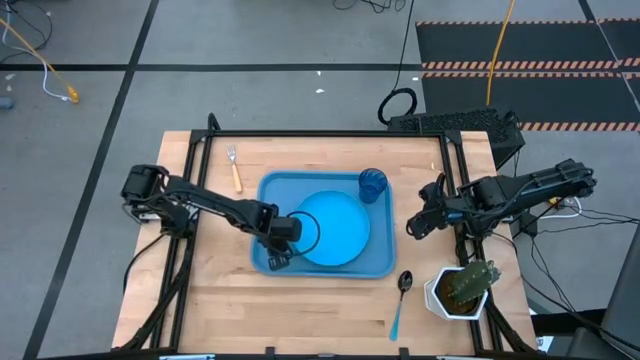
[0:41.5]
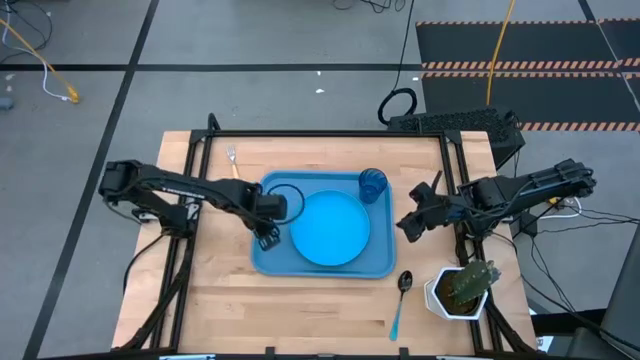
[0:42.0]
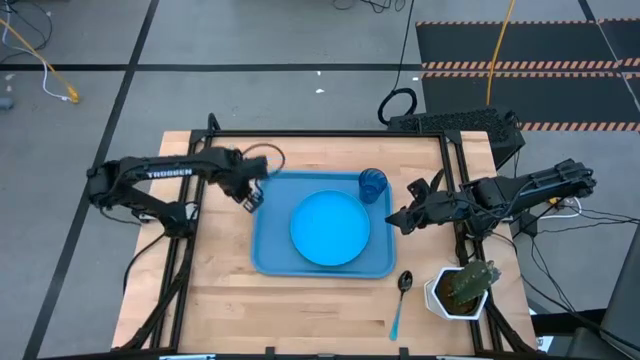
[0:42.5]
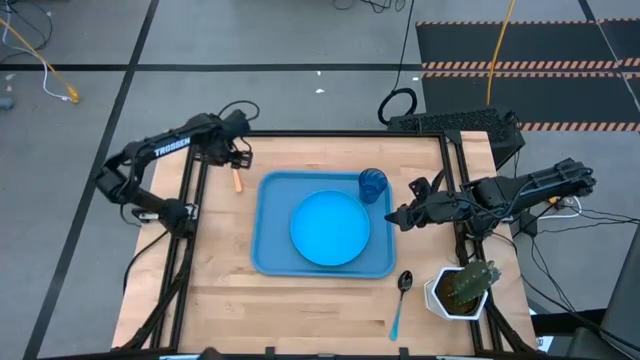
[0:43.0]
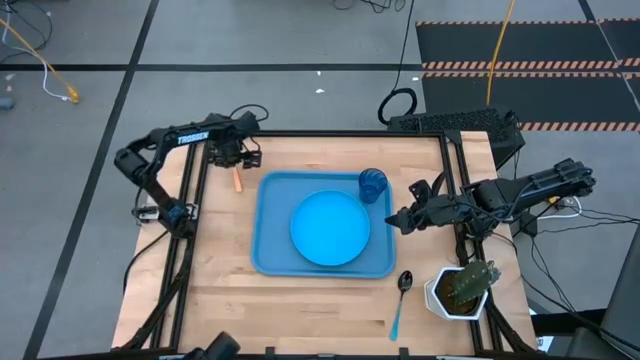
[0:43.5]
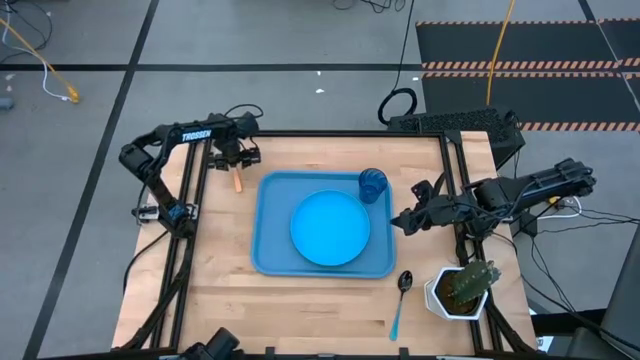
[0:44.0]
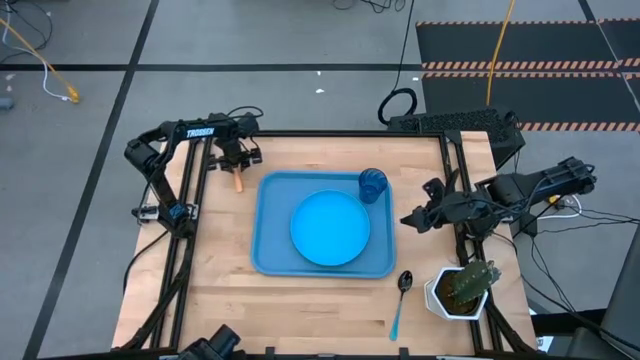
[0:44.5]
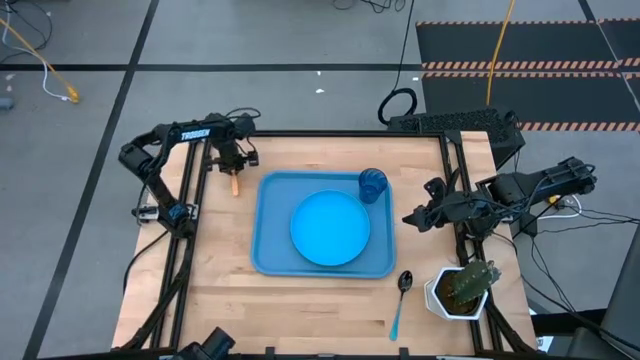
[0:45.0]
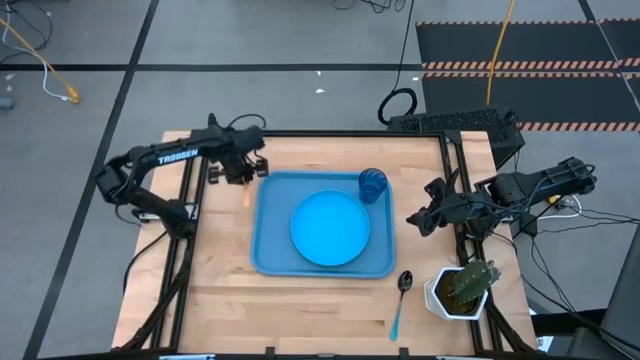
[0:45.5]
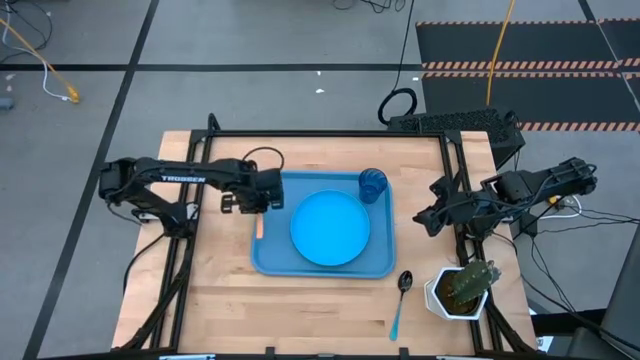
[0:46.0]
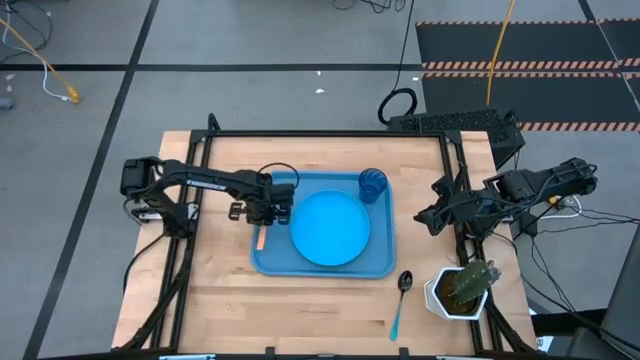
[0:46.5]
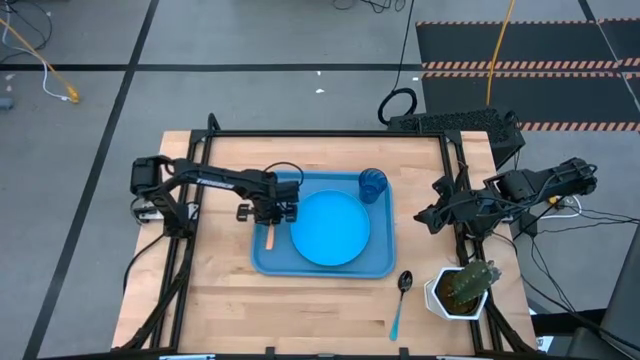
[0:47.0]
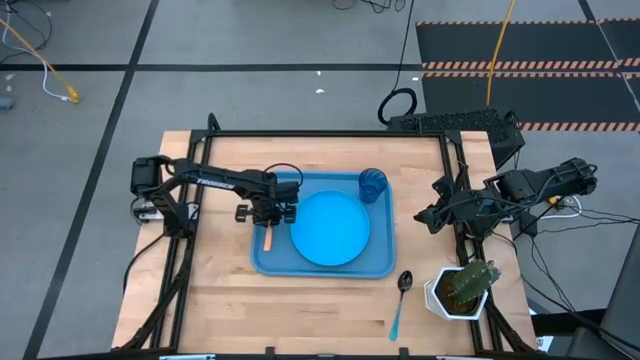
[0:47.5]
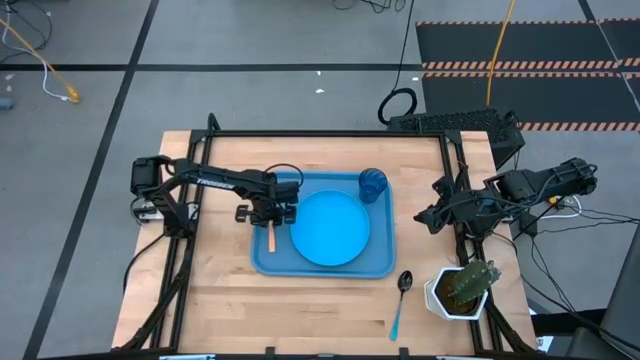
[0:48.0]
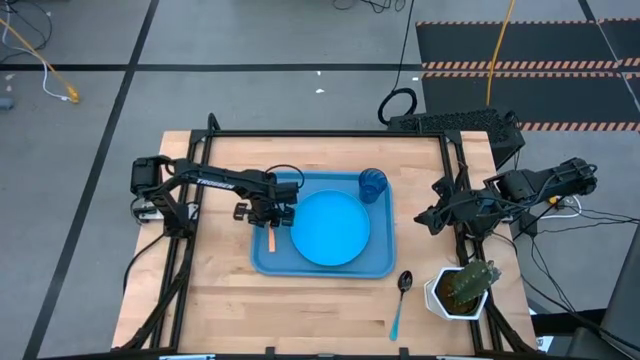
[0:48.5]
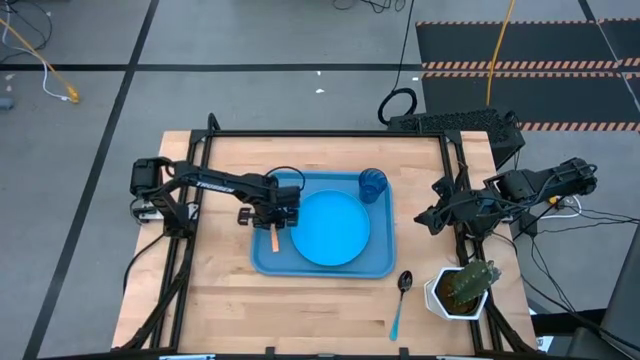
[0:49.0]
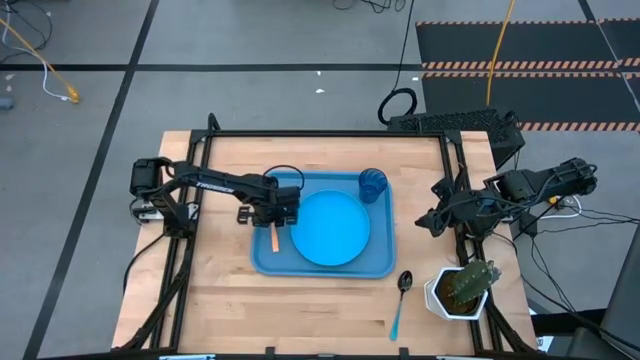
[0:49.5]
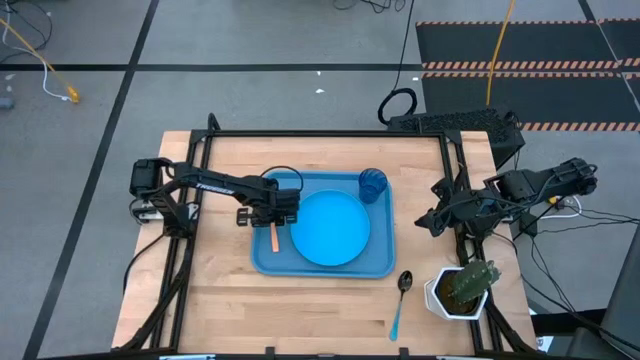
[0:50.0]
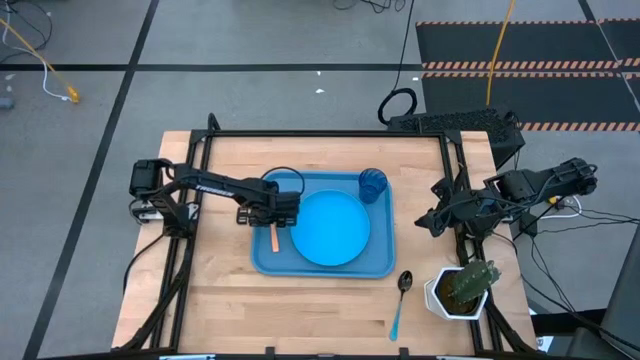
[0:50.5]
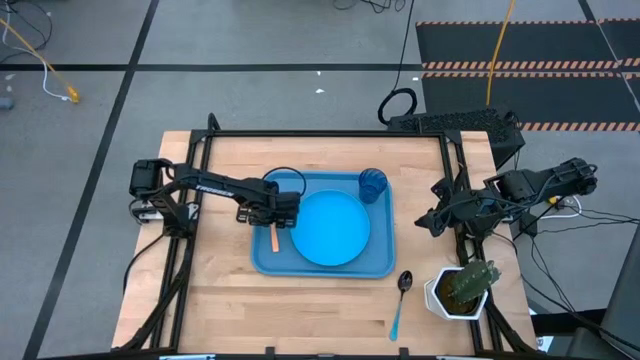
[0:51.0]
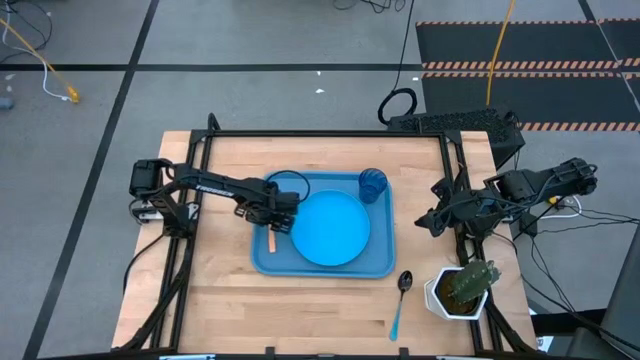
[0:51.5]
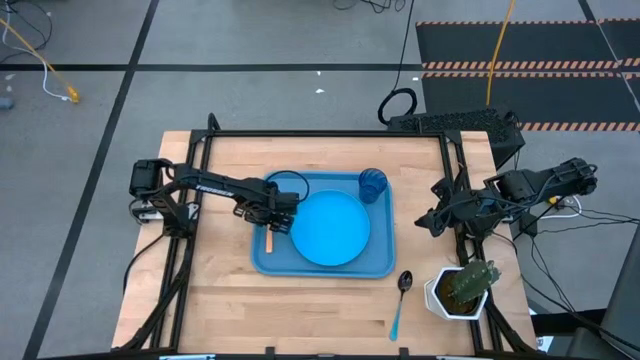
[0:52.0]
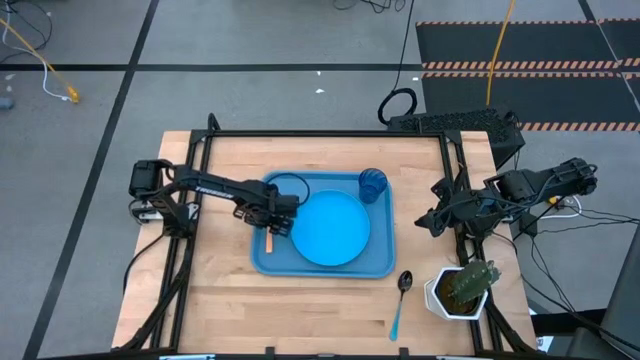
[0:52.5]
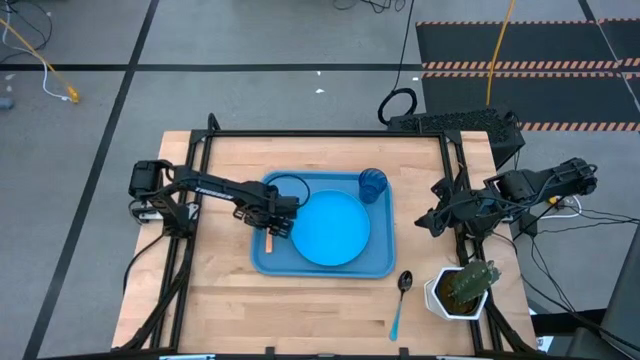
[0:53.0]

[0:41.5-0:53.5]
Task: Pick and place plate/cup/fork/spoon on tray
Put the brown fork on the blue tray to the left of the blue plate

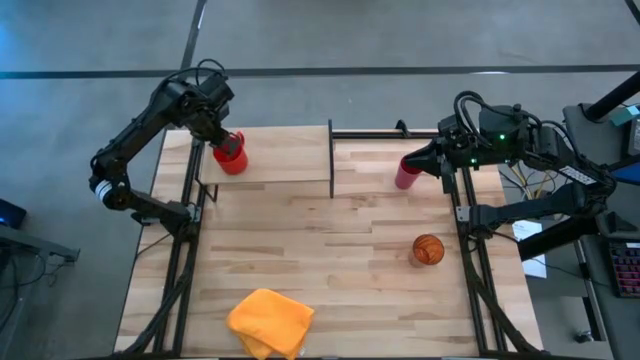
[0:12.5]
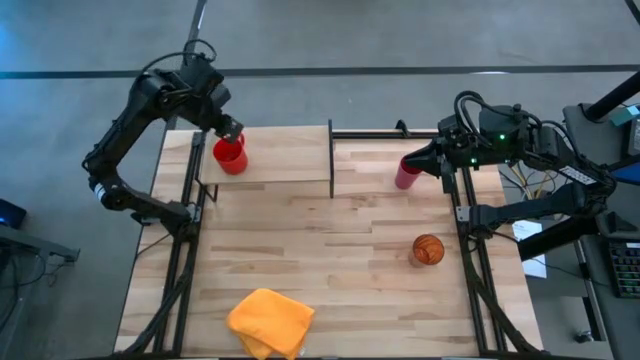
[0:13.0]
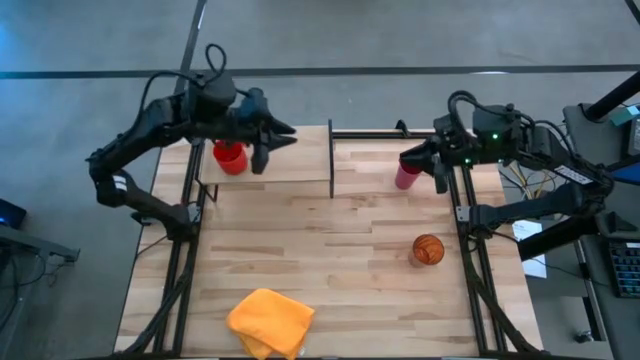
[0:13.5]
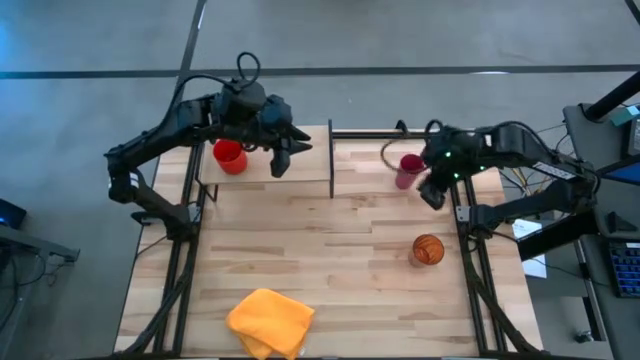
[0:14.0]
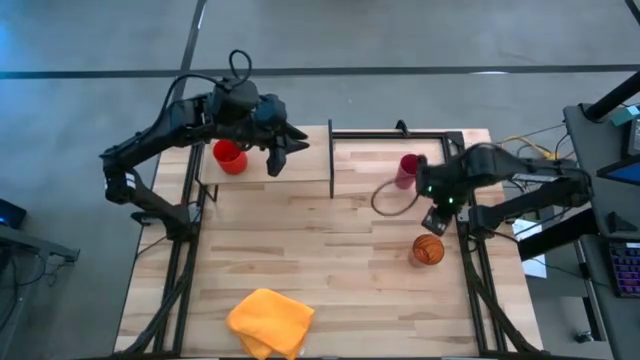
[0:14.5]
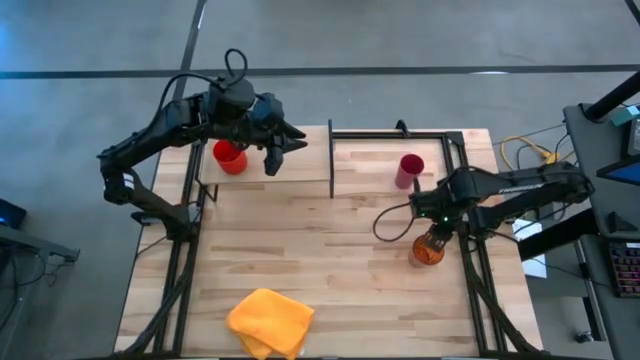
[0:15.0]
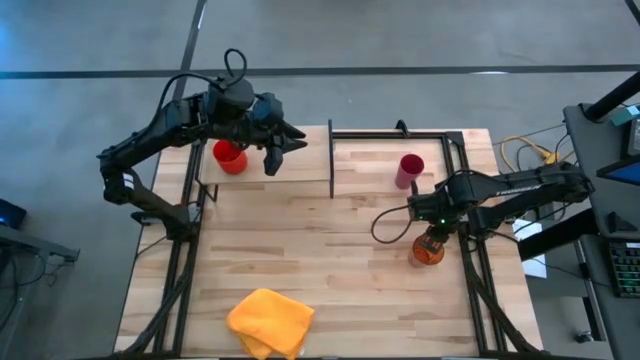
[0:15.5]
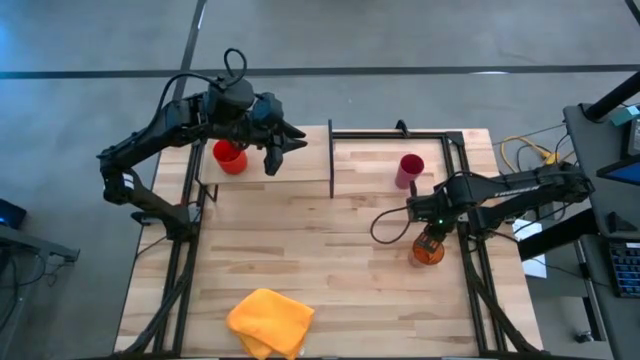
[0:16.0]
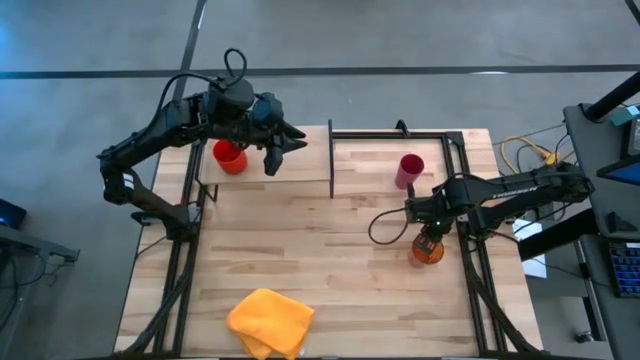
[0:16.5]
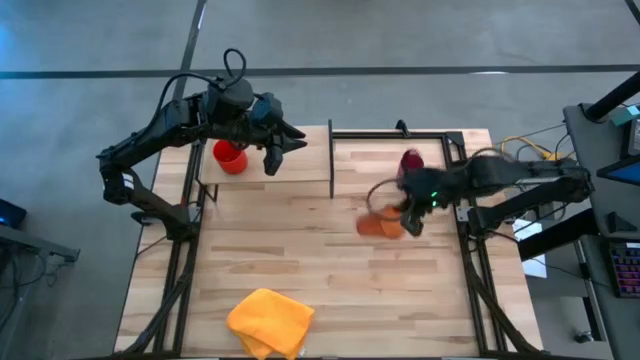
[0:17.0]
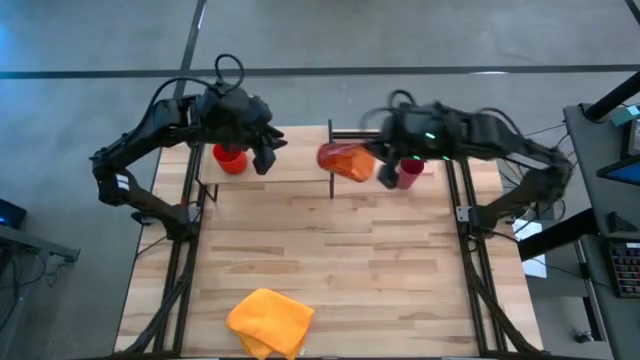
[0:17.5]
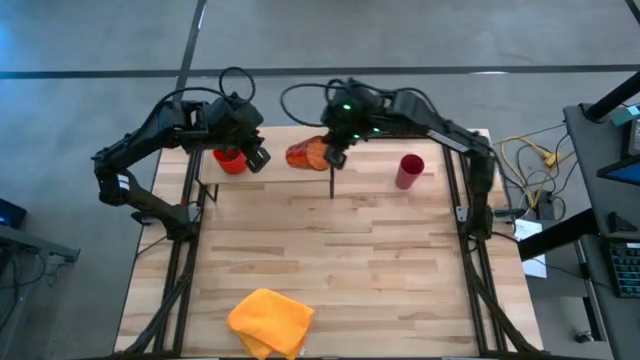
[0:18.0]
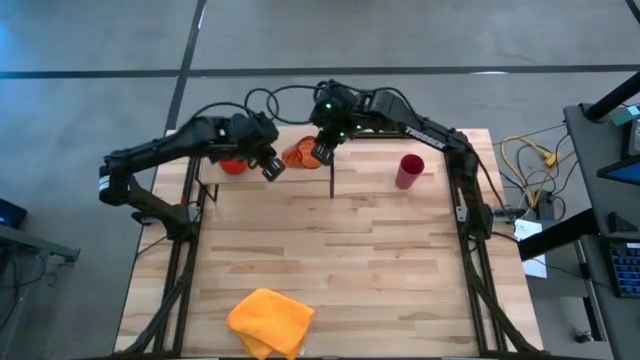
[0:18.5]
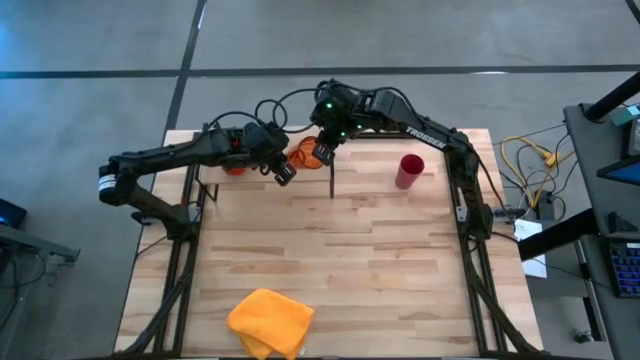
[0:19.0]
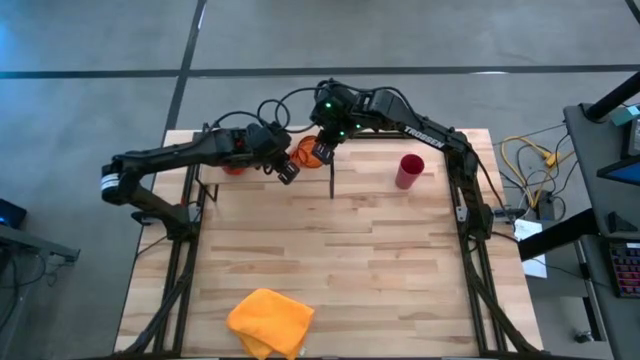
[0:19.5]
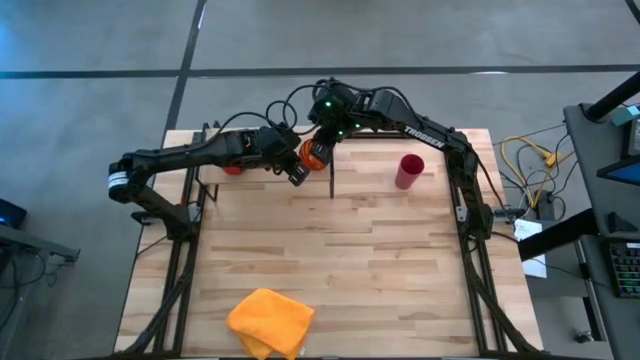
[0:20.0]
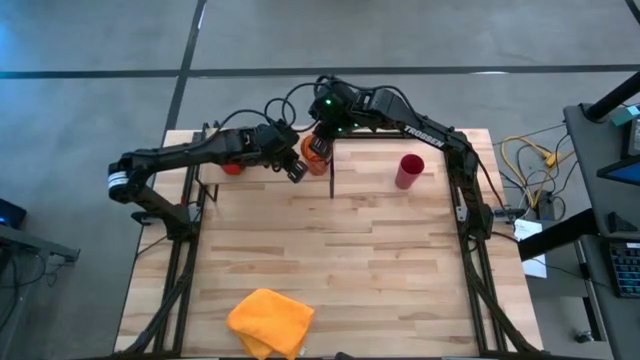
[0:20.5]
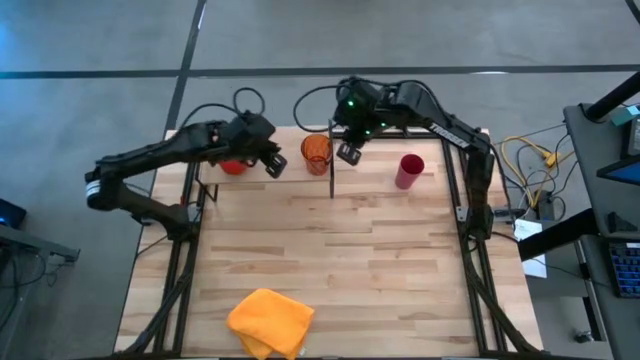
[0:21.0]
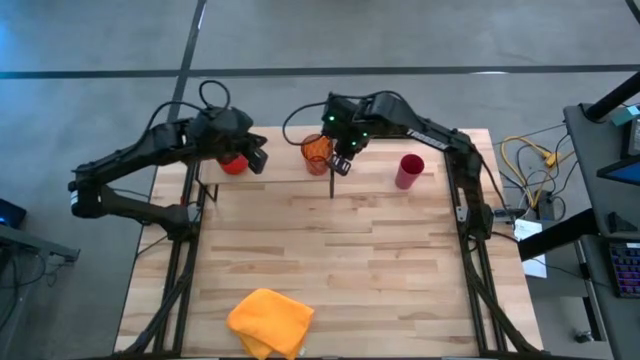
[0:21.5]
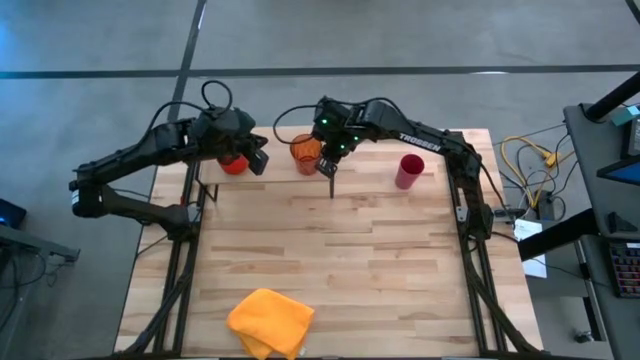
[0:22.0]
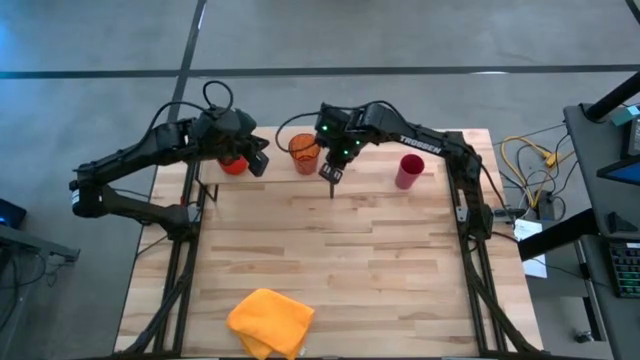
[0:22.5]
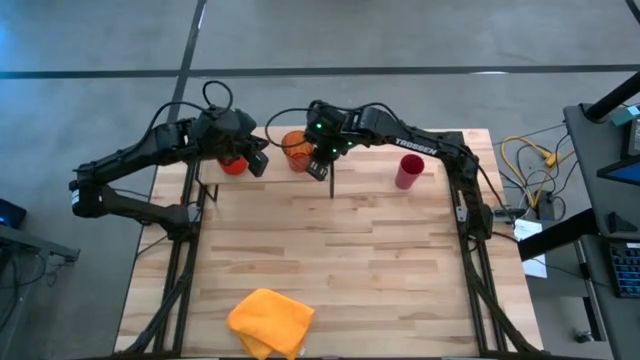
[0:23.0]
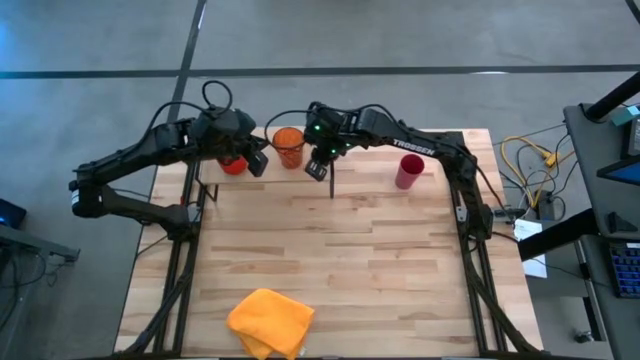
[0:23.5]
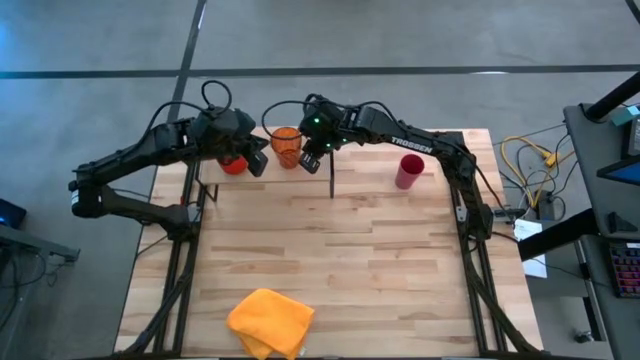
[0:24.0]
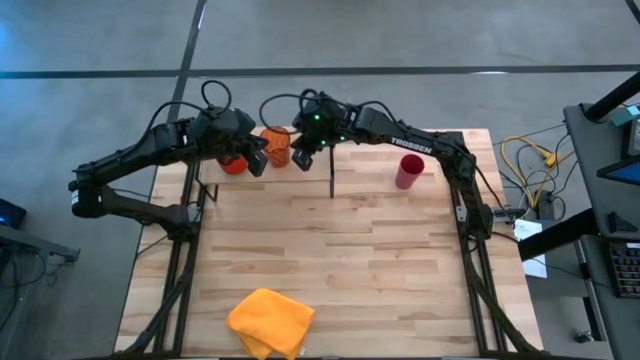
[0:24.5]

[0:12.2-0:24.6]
Task: Stack small to large cups/mugs on shelf
Put the orange cup on the shelf
